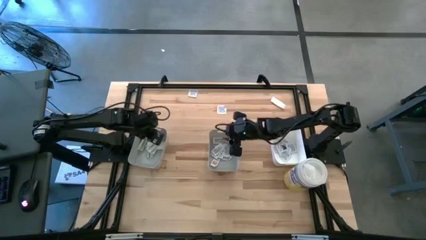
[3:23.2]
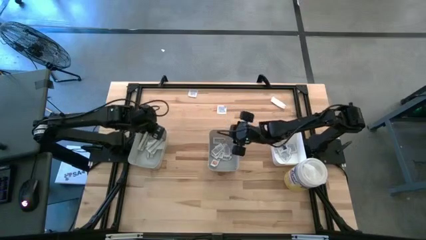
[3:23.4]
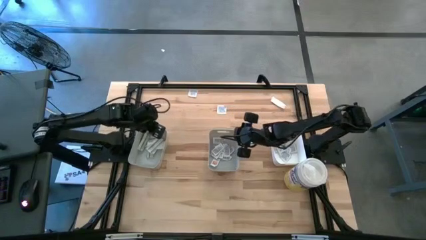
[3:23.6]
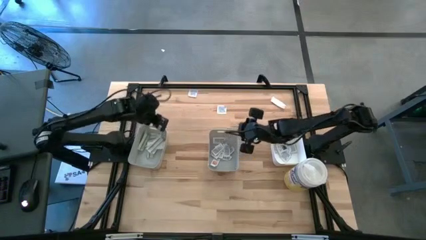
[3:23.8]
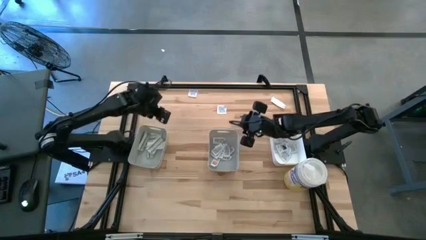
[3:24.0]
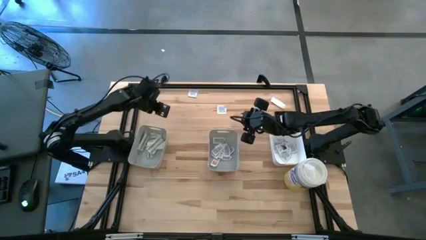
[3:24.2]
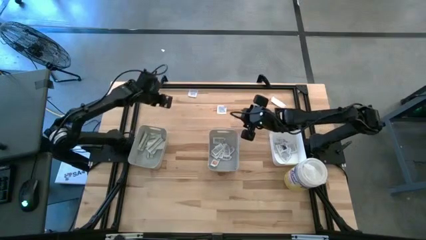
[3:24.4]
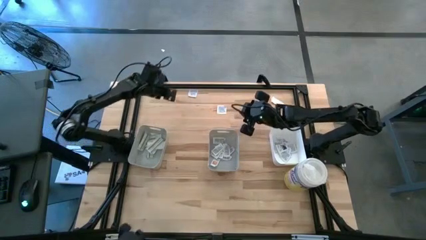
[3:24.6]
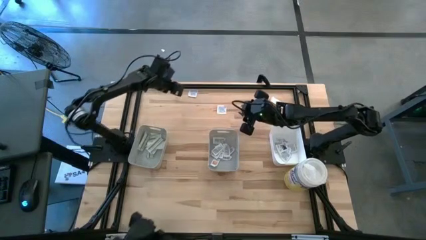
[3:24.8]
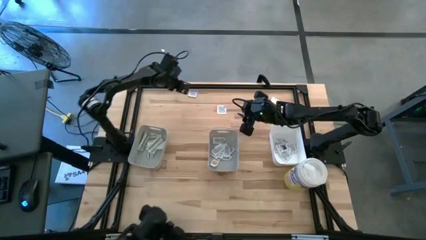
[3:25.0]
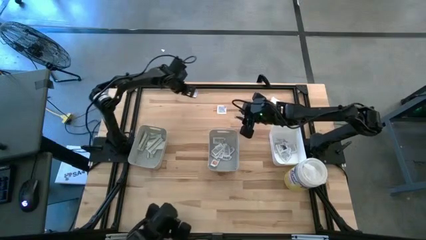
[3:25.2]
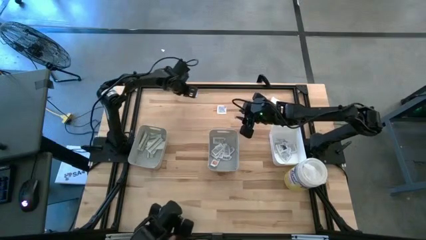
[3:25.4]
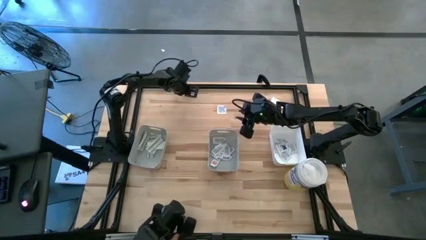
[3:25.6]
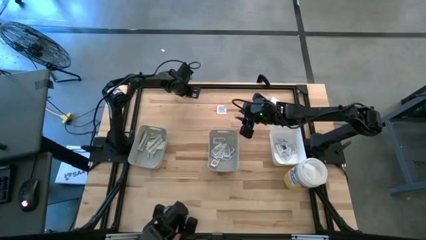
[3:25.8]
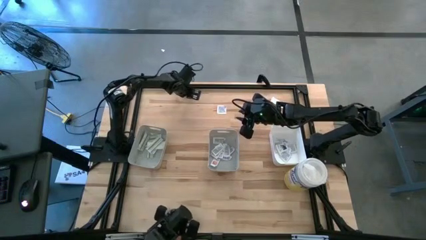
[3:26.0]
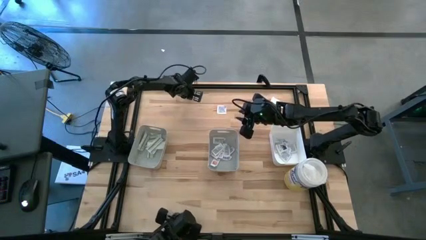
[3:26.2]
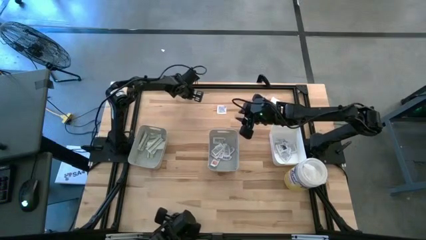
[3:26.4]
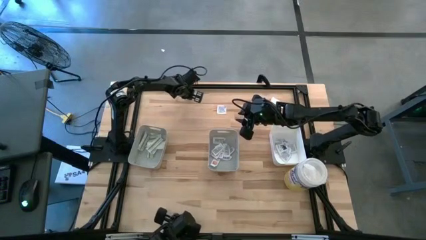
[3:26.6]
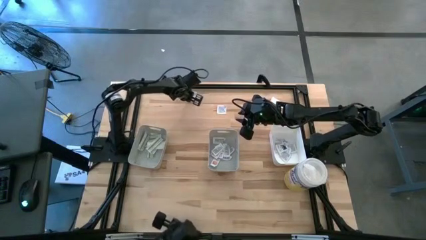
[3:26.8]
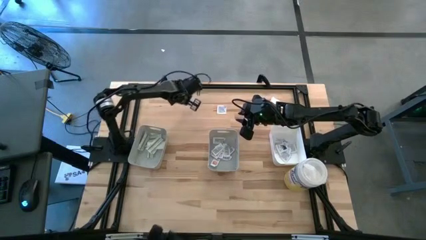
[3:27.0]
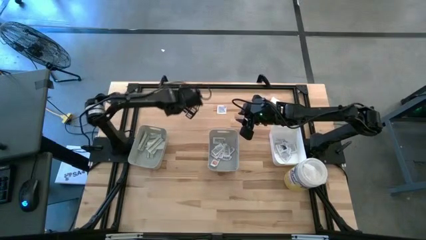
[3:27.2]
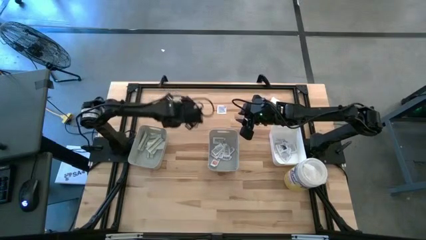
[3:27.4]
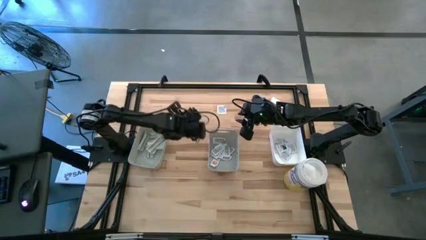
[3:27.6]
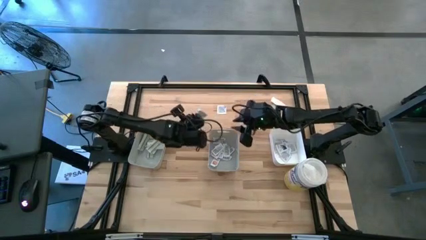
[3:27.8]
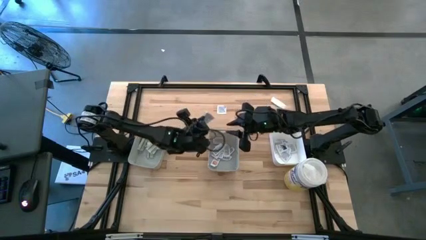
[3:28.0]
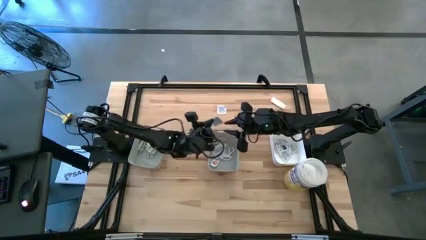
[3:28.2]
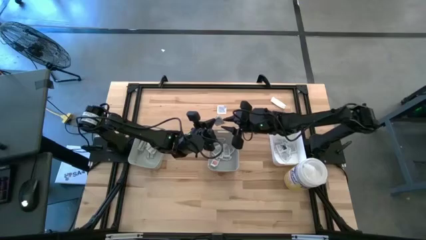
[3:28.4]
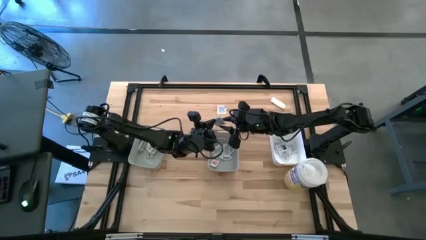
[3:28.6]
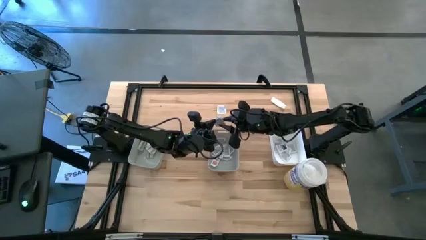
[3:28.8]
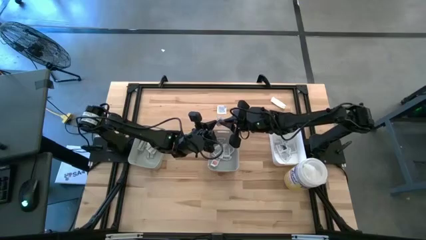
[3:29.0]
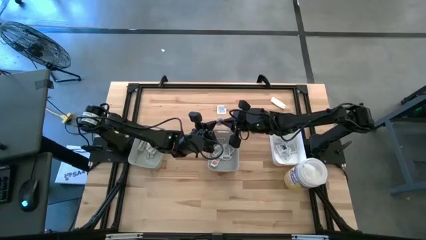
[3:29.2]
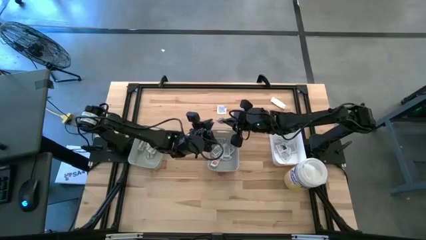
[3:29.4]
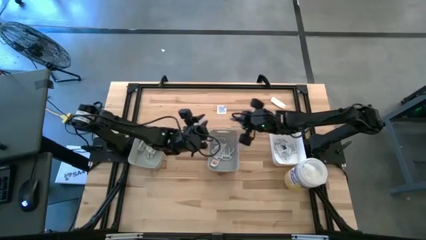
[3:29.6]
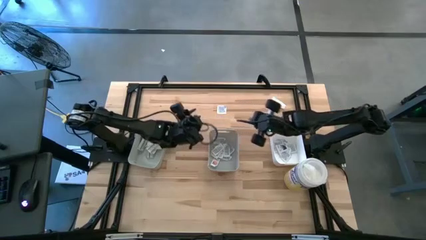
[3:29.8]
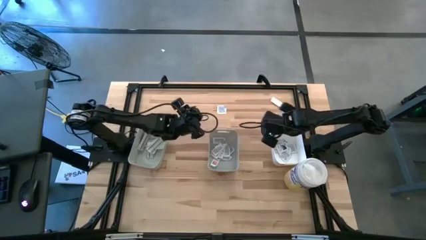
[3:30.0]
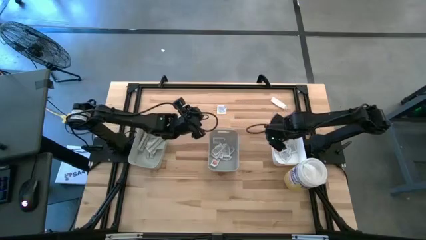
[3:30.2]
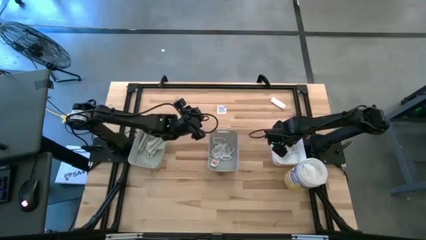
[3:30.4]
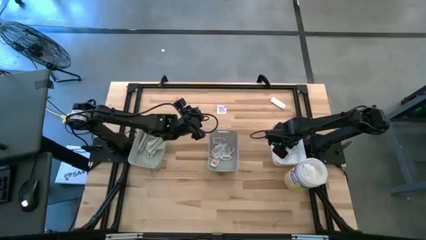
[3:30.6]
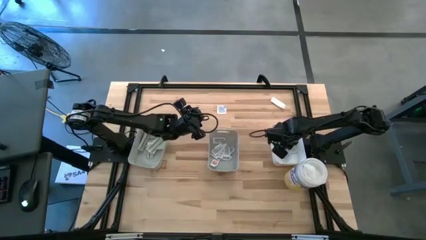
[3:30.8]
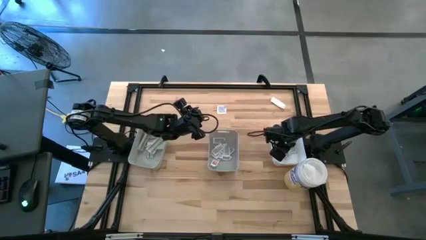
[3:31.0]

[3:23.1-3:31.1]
Task: Pick & Place First Aid Supplies
Put the alcohol pad into the white bin

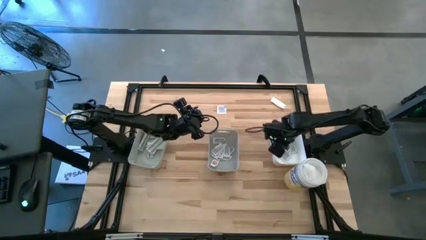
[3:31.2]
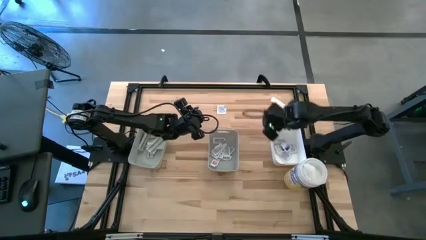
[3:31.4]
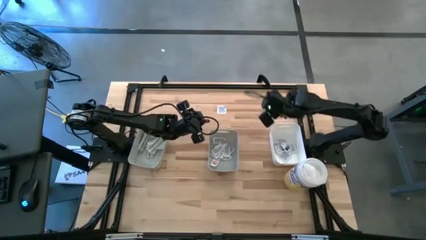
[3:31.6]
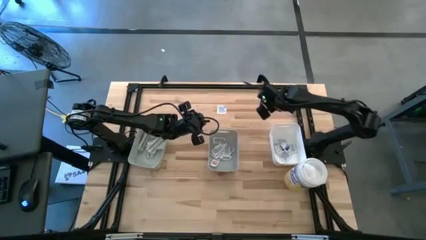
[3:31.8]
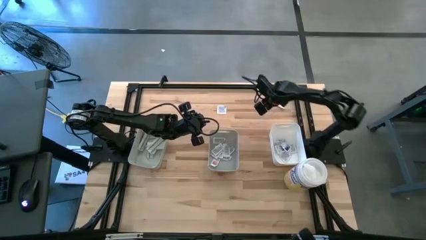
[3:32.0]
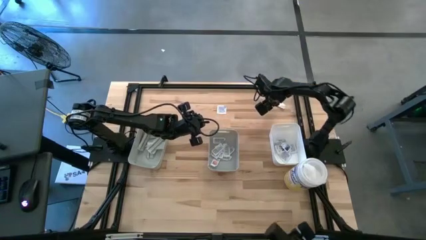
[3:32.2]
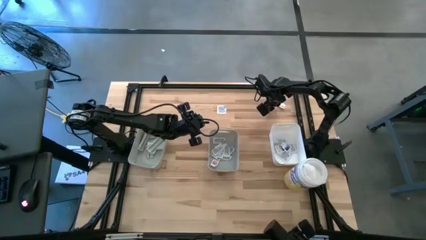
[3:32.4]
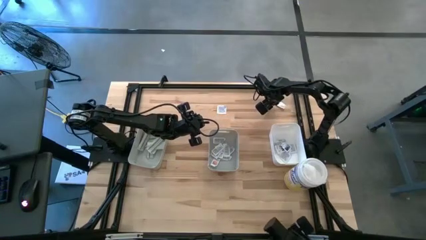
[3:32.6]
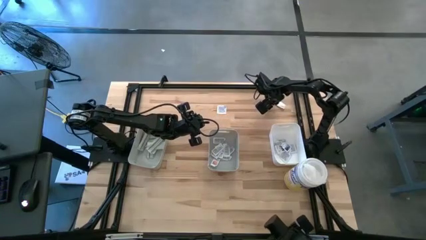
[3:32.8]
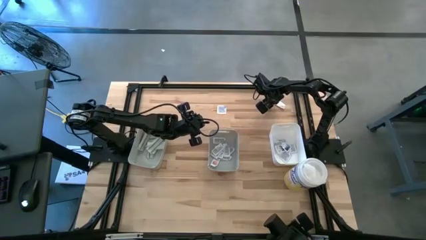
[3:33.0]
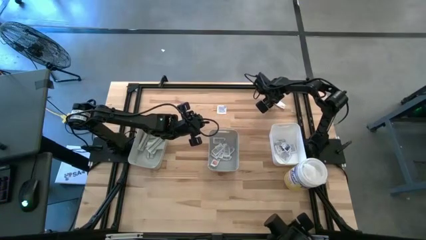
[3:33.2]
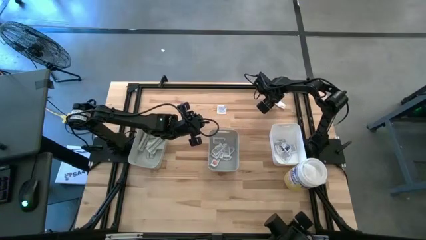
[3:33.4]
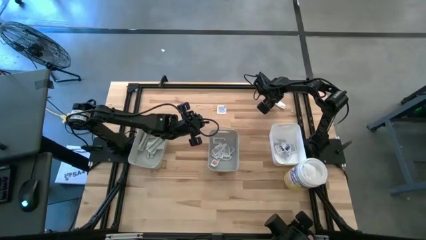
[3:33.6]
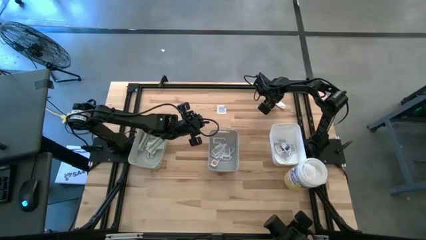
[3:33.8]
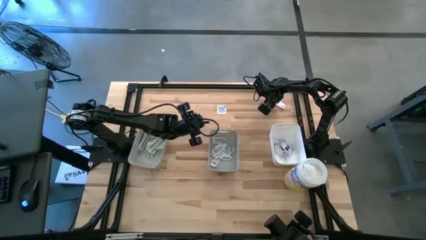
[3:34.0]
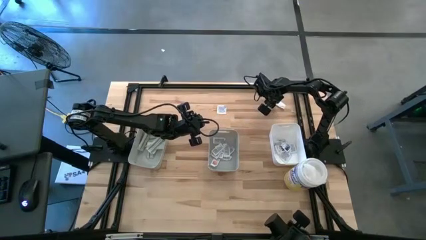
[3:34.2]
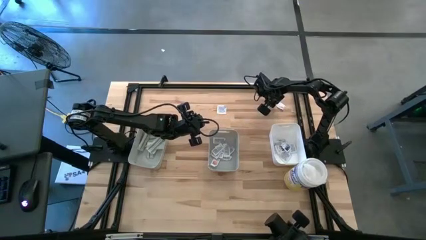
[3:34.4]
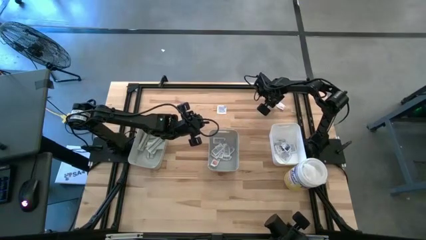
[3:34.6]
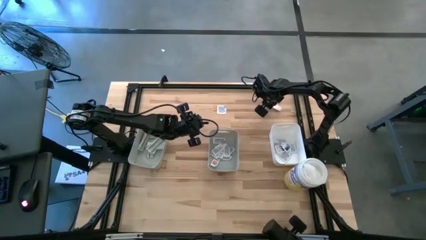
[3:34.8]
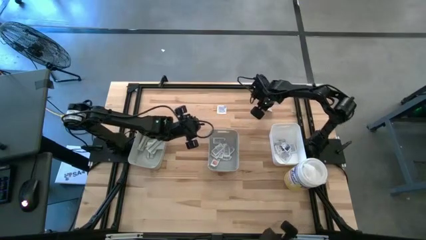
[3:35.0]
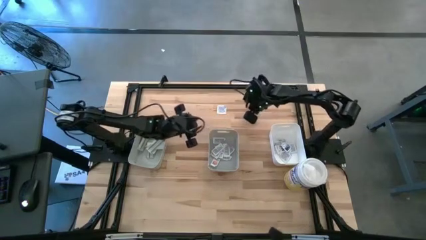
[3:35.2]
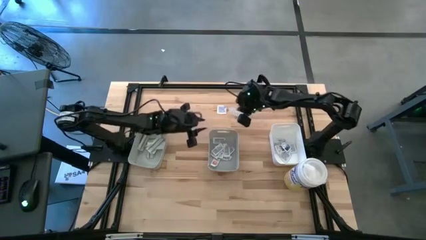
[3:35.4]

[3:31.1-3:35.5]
Put the bandage pack into the left gray bin

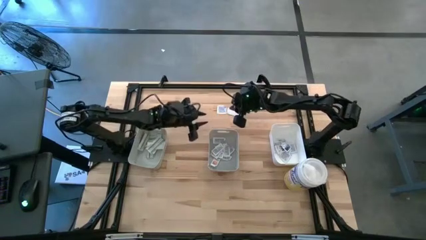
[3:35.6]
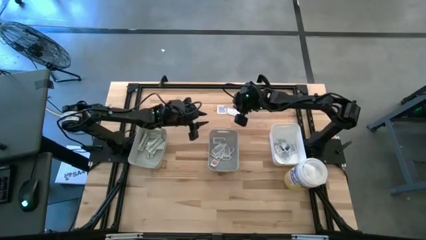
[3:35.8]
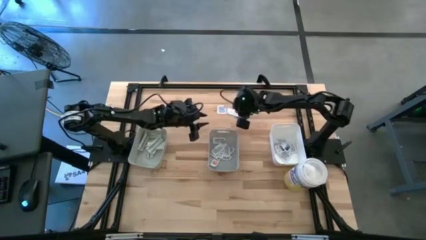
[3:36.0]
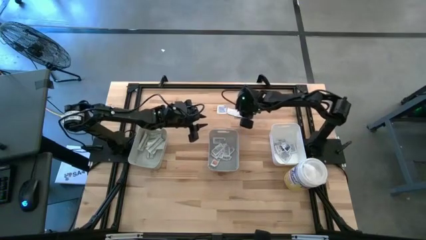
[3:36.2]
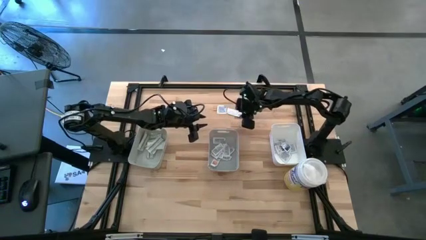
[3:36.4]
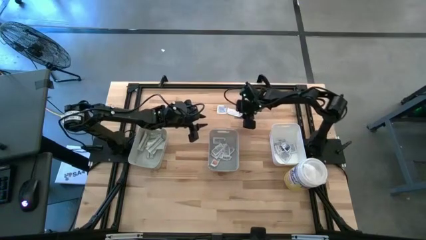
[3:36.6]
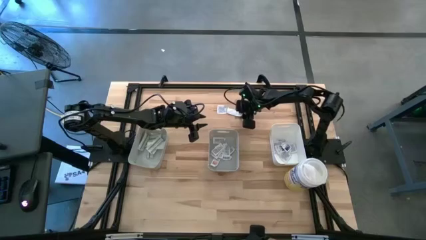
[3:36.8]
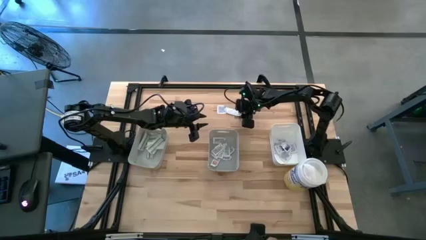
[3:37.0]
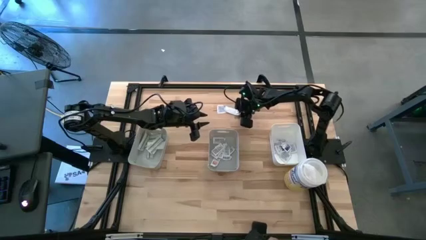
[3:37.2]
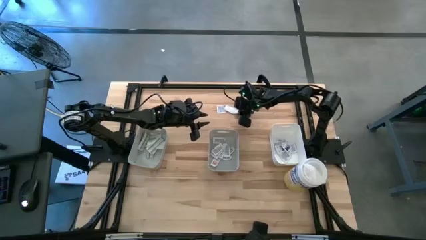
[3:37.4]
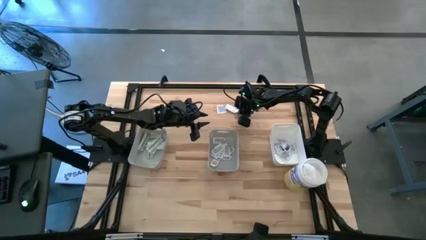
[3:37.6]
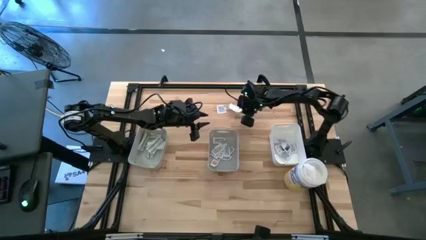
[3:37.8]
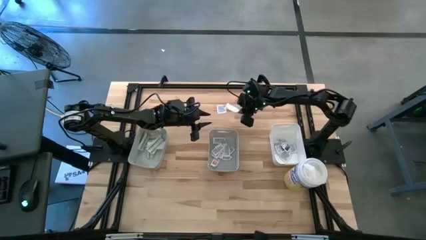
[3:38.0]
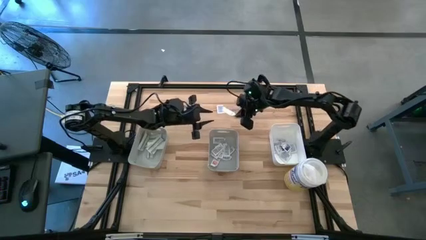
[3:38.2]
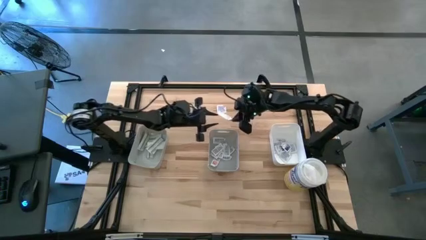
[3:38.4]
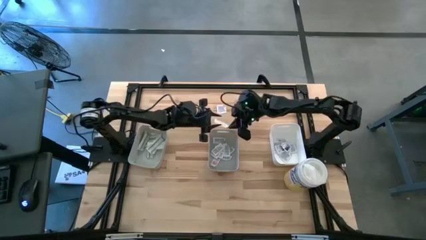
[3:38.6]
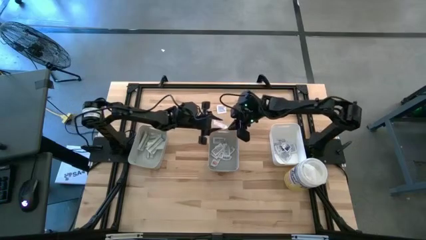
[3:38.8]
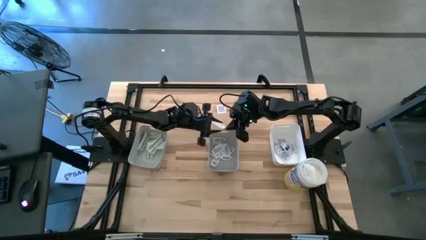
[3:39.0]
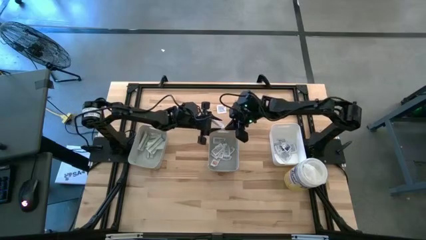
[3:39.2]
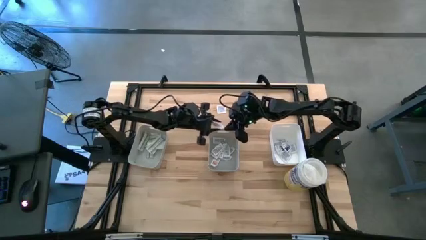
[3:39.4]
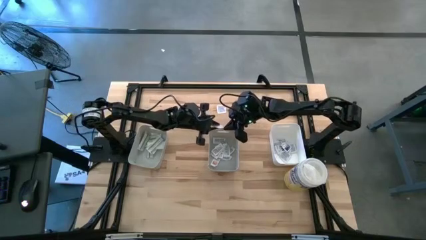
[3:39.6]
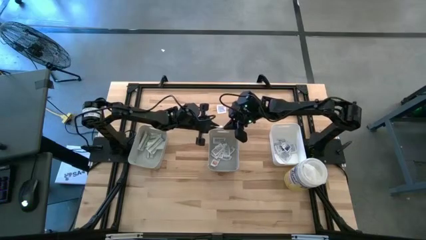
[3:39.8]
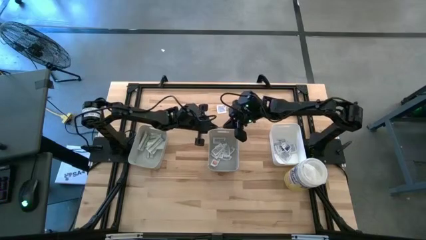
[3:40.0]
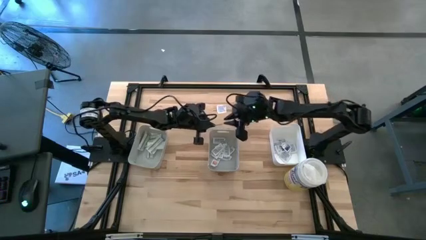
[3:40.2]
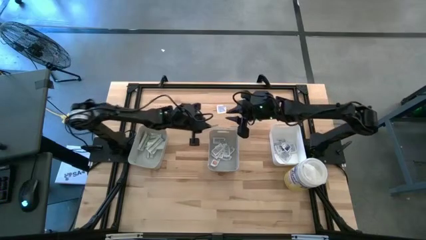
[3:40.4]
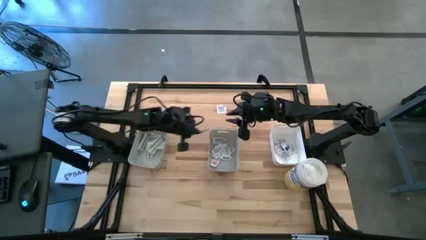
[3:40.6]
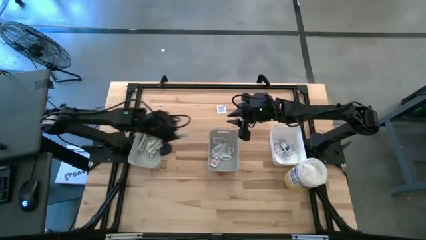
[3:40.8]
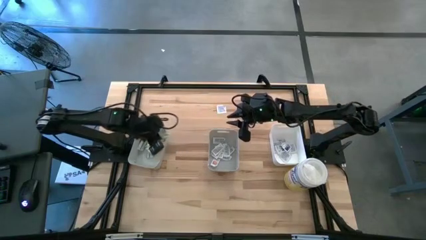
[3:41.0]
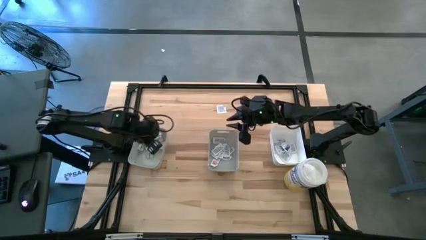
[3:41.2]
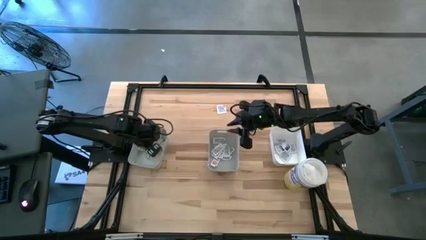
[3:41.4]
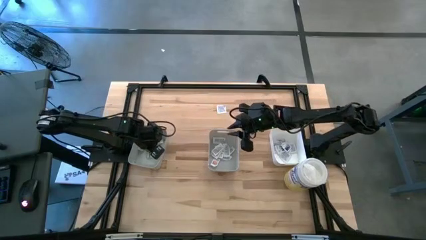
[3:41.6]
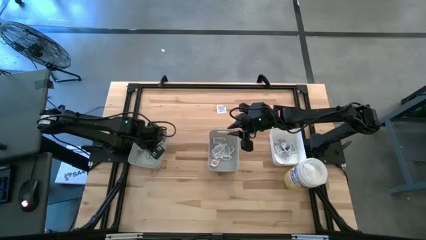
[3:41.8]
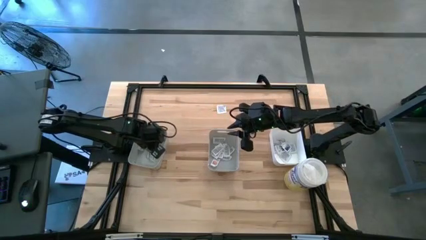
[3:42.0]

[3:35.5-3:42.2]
Put the bandage pack into the left gray bin
